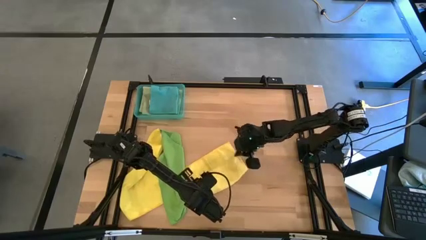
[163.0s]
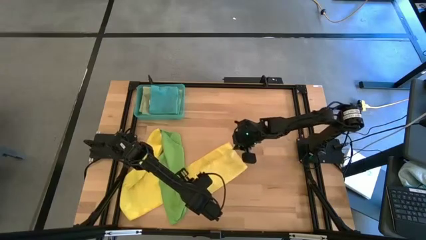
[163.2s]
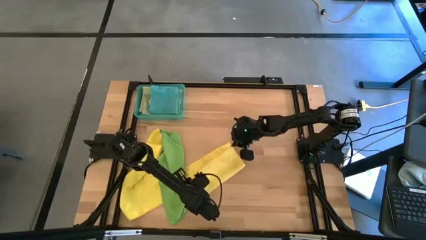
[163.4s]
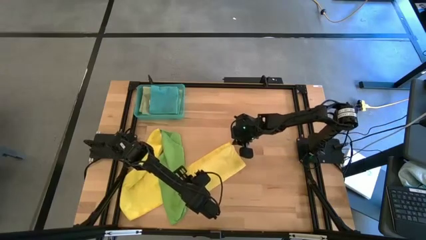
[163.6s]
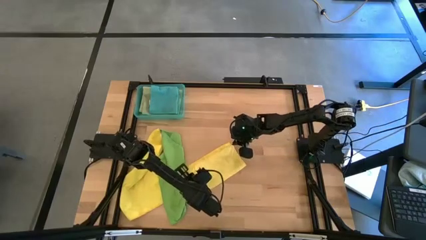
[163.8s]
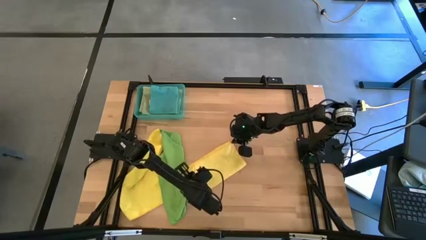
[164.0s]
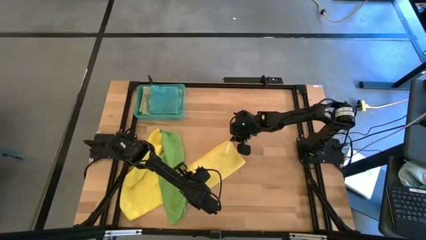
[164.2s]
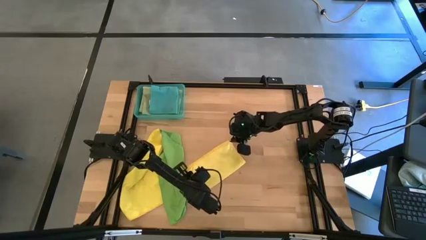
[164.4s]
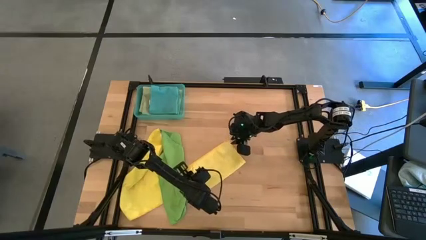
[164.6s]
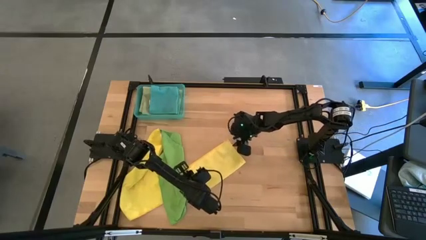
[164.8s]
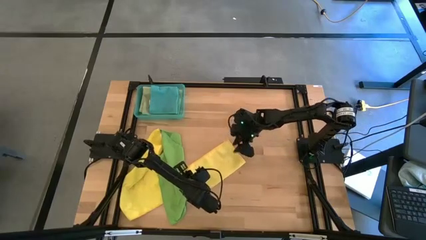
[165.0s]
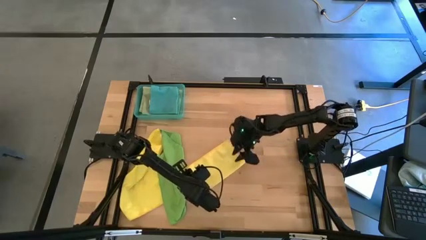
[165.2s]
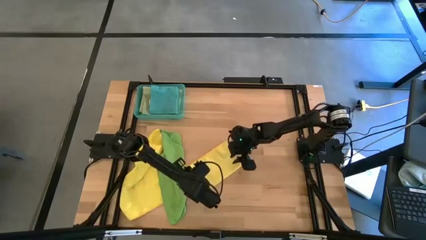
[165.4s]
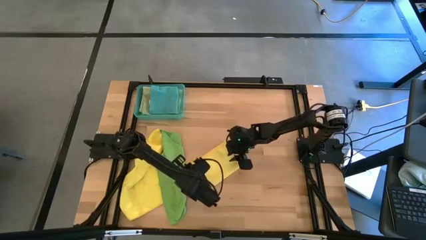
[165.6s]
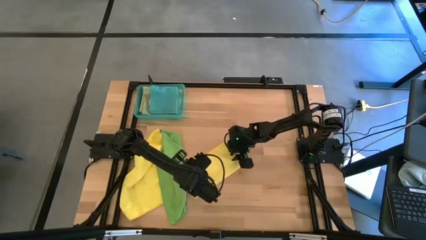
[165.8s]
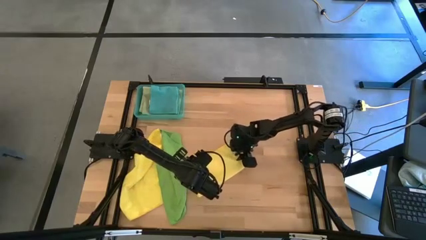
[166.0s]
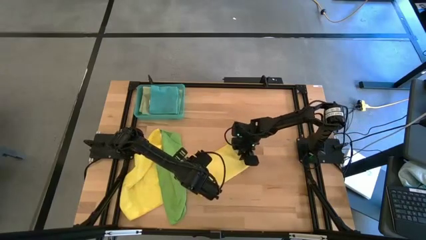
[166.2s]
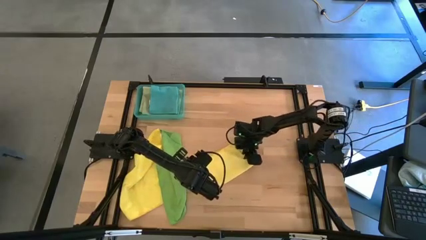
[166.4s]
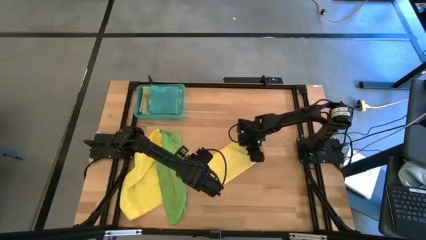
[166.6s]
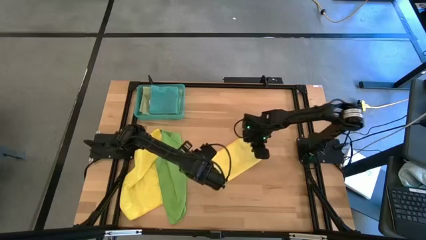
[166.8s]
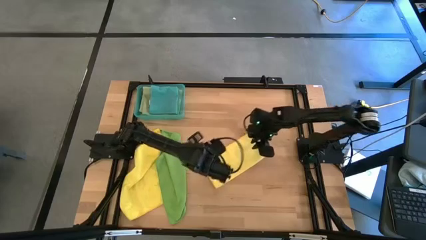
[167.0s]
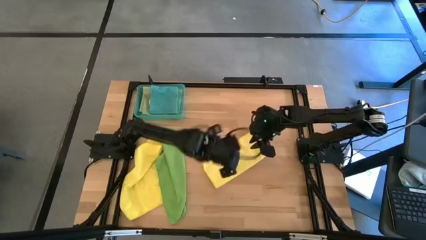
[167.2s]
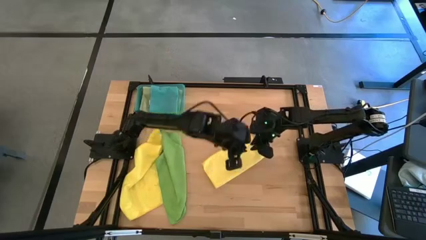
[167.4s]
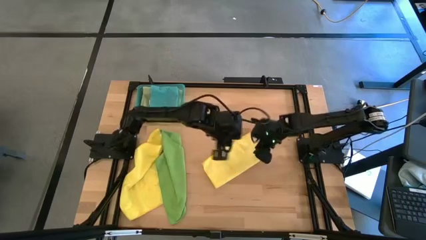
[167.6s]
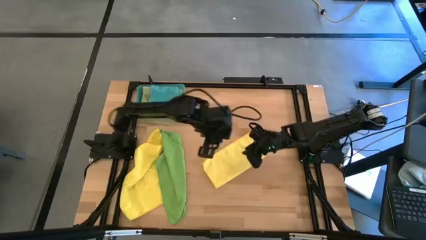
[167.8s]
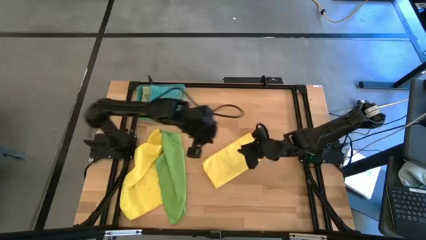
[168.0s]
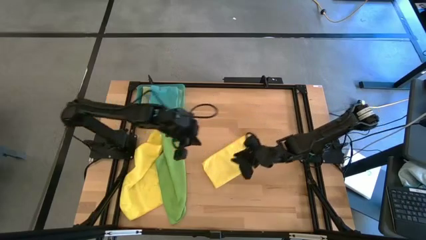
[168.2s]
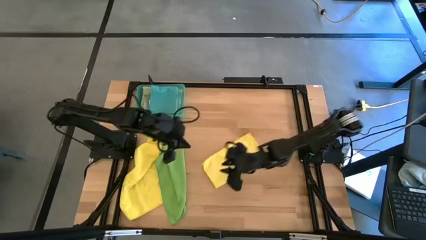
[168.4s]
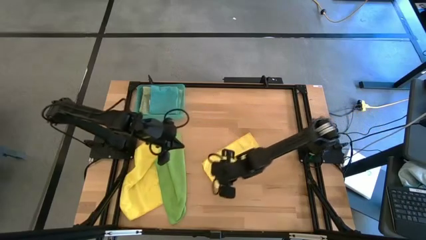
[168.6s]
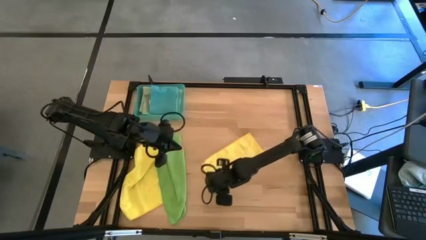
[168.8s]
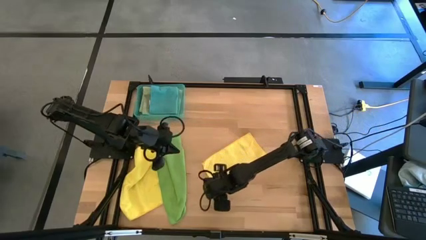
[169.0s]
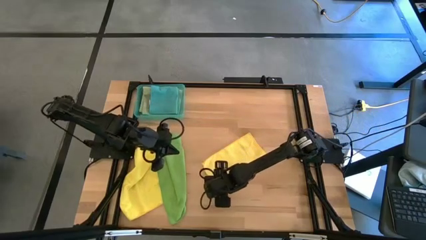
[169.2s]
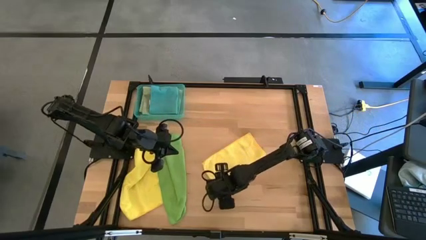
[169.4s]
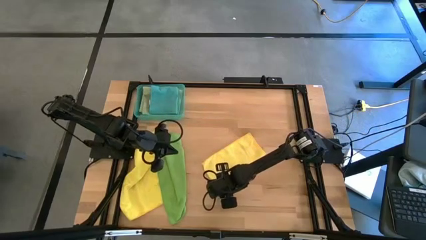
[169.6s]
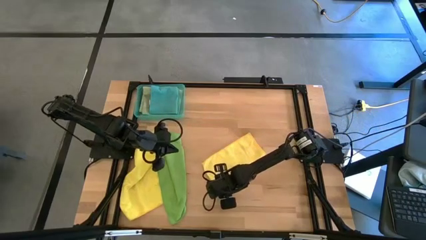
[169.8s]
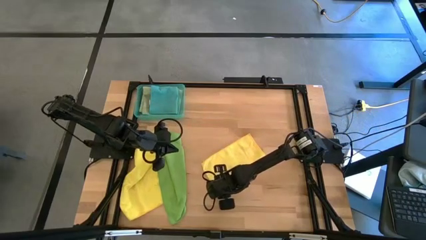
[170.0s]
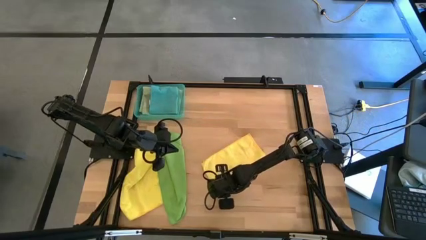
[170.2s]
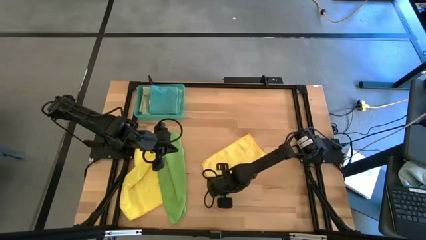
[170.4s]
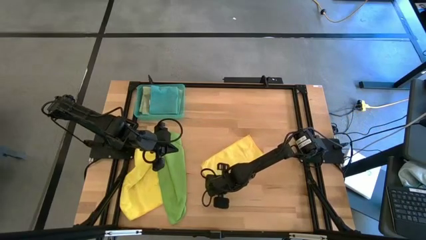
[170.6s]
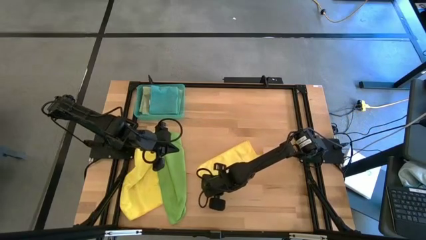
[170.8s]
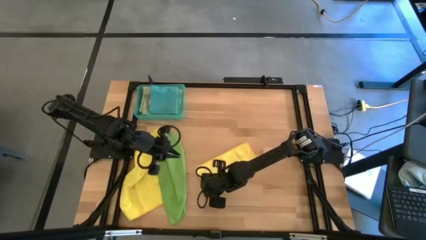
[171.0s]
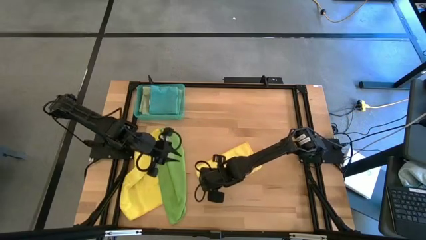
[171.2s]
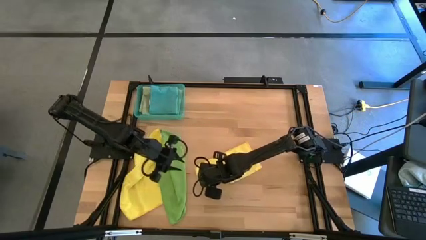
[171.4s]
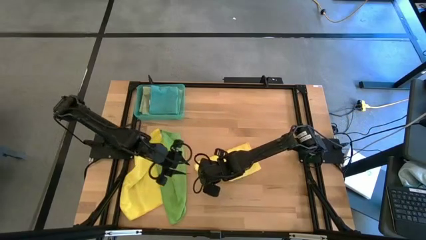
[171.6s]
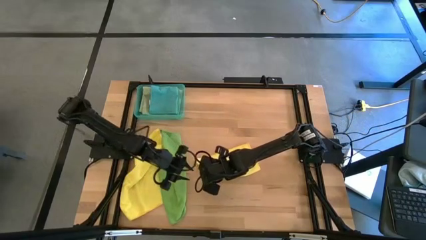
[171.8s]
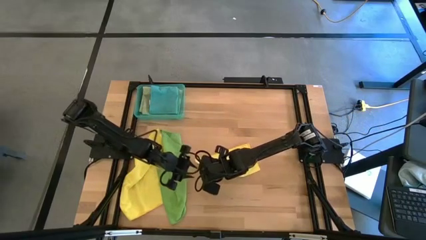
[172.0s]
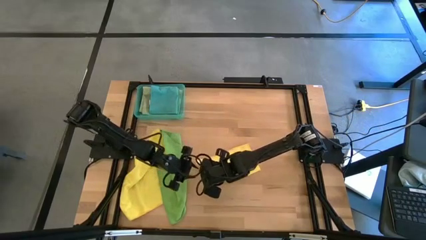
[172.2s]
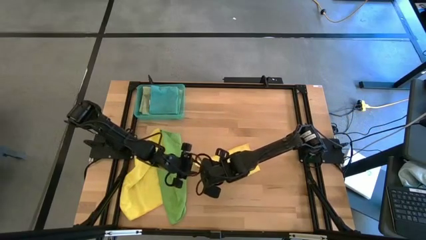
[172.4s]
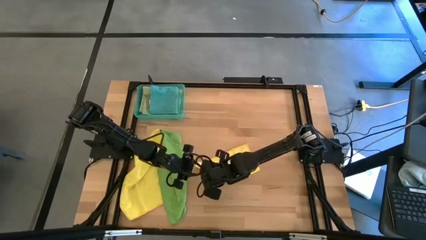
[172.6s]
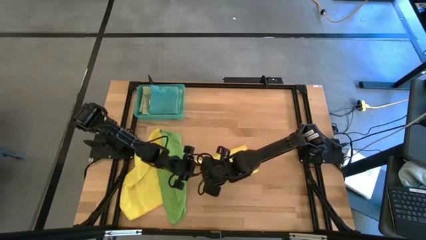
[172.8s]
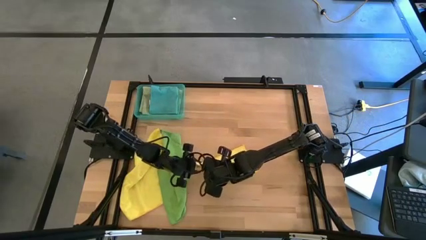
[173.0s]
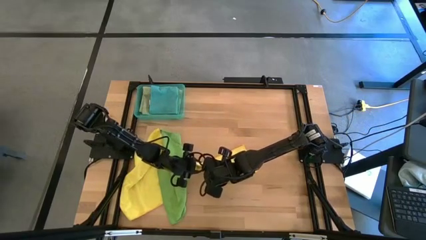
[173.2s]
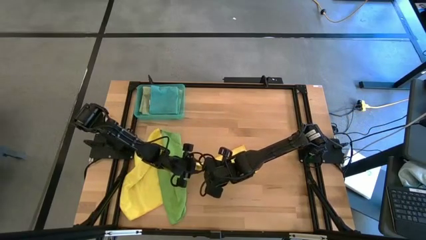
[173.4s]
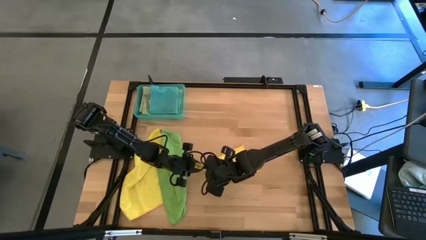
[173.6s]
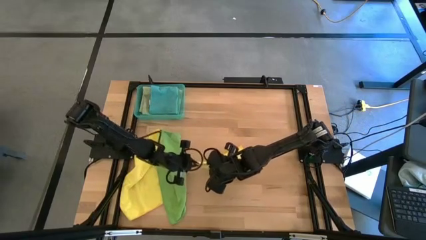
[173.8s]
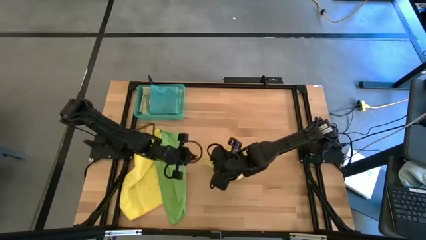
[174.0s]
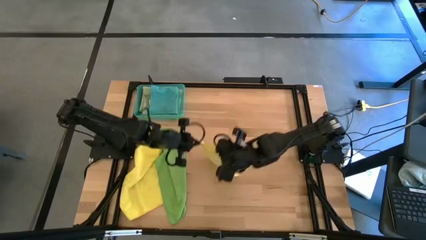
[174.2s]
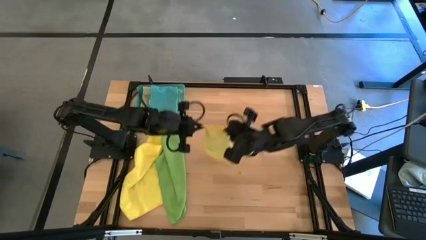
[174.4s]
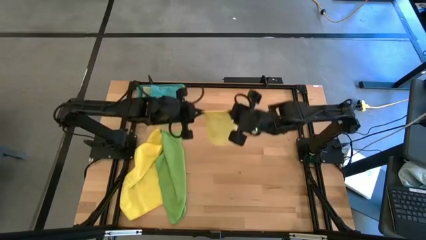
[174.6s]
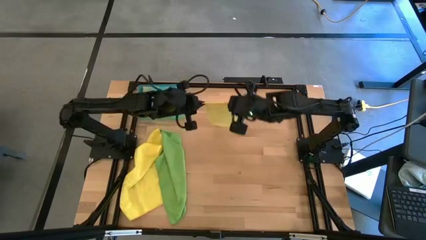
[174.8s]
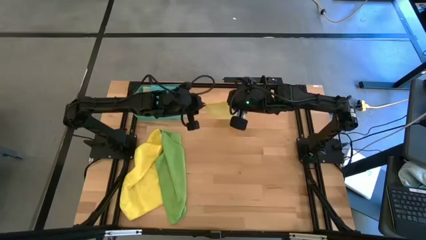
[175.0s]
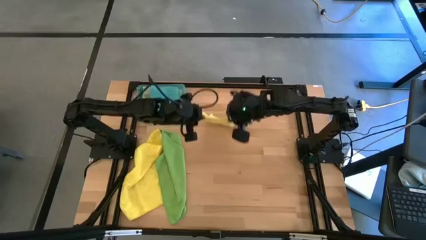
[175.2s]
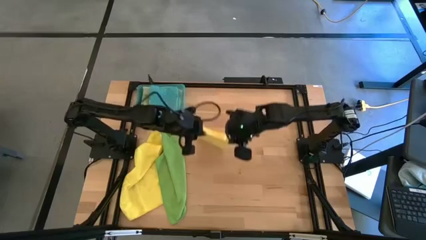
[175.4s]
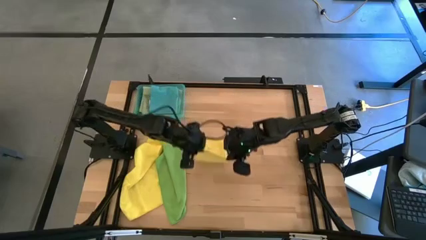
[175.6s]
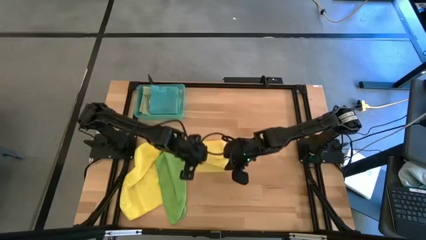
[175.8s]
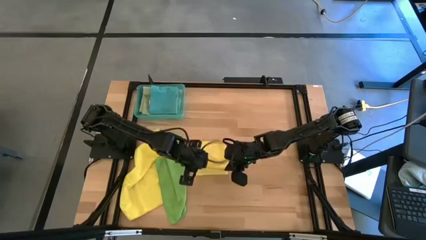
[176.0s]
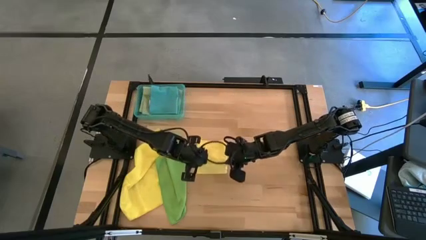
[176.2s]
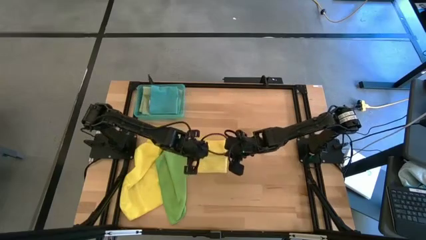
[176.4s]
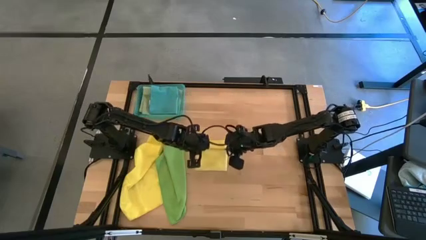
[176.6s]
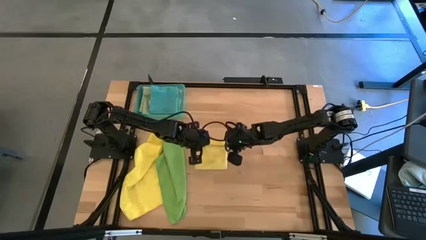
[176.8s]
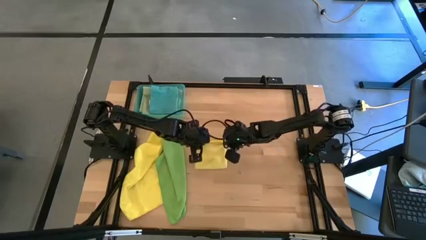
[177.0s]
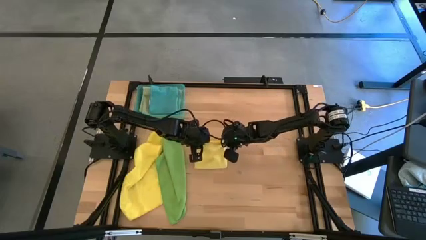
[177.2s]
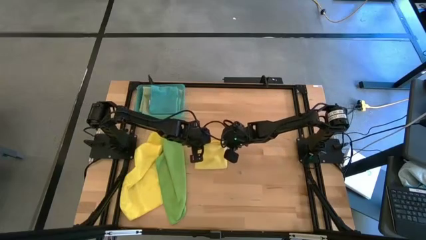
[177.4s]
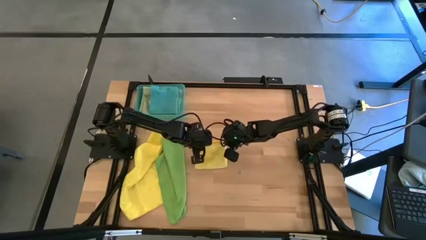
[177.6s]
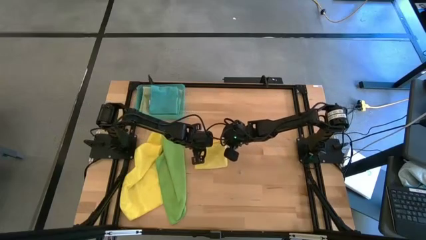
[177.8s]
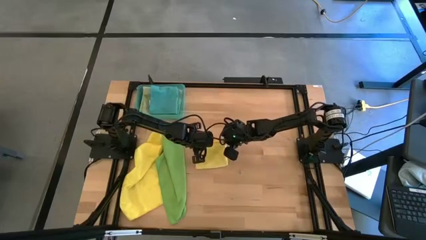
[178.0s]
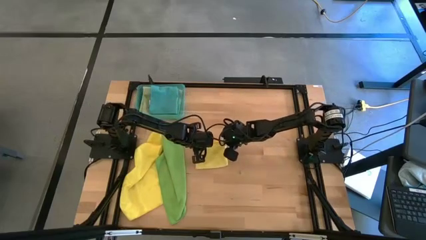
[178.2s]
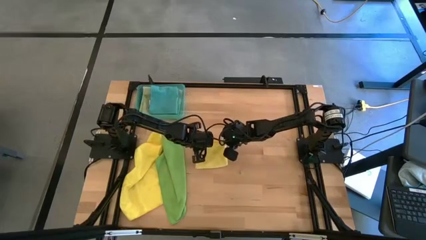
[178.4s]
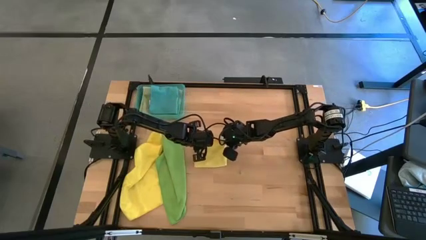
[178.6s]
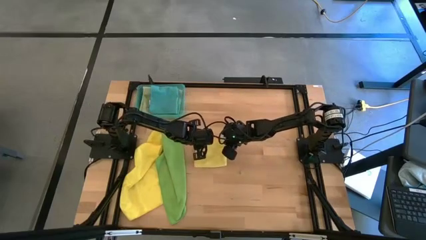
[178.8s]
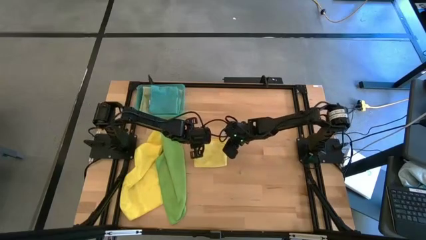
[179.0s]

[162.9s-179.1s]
Task: Fold microfiber towels
Fold the right yellow microfiber cloth

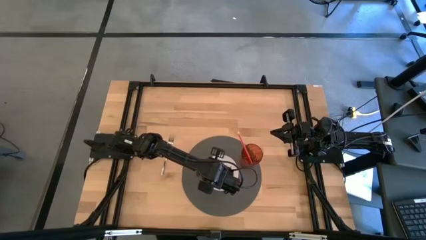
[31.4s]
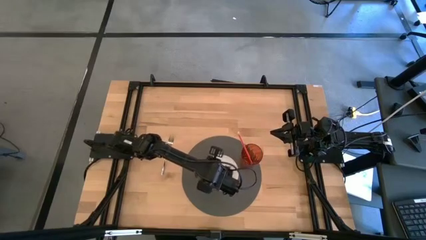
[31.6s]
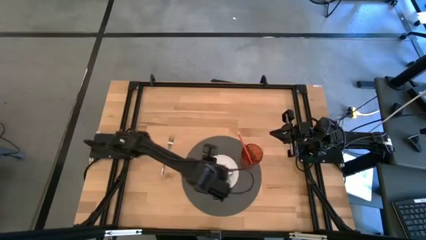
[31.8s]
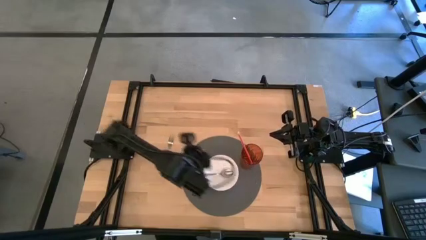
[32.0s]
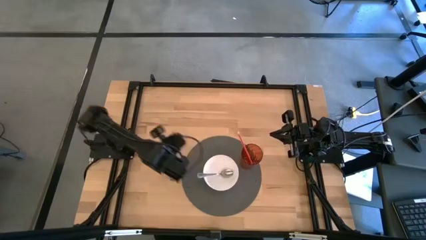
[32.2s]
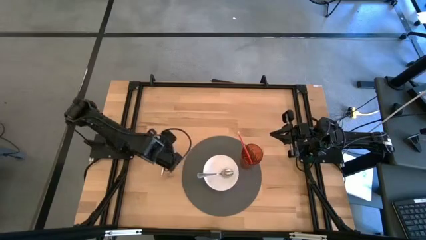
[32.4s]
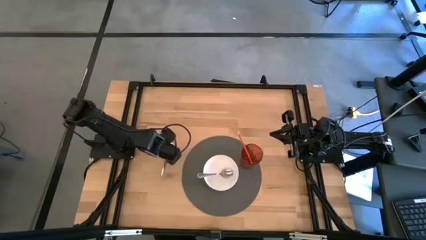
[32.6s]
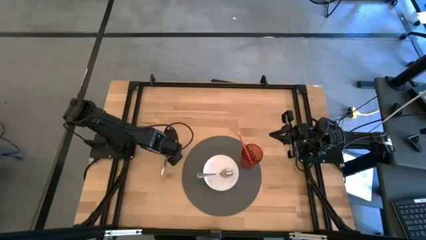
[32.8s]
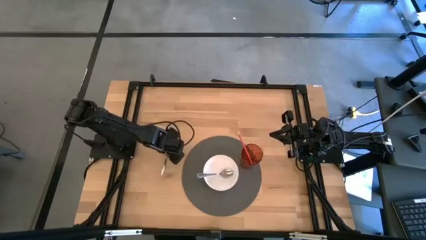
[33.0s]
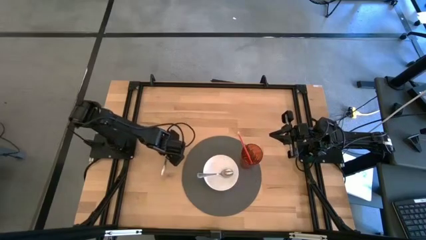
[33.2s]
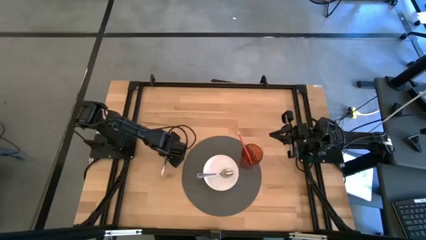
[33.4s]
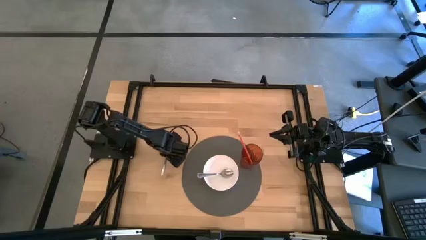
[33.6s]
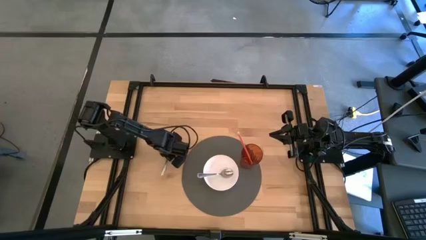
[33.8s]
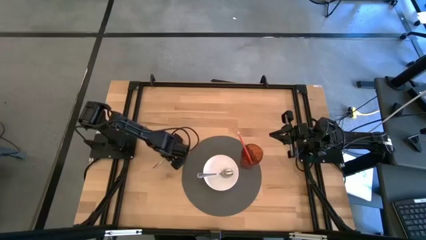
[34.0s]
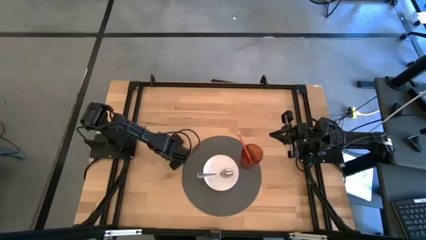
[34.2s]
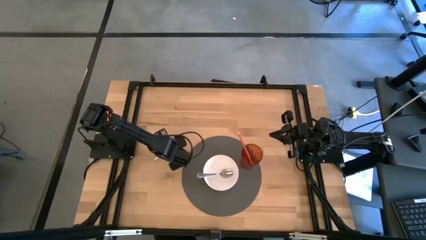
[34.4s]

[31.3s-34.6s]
Task: Pick & Place Utensil
Put the silver fork into the white bowl
